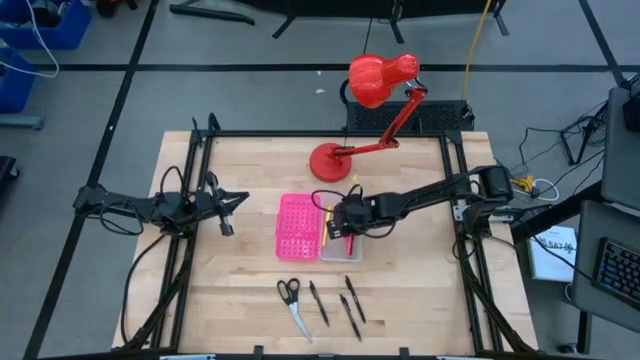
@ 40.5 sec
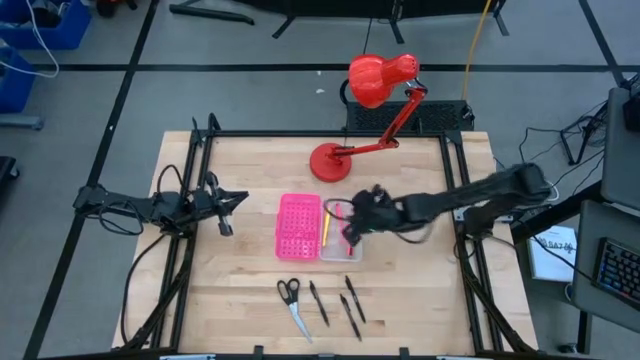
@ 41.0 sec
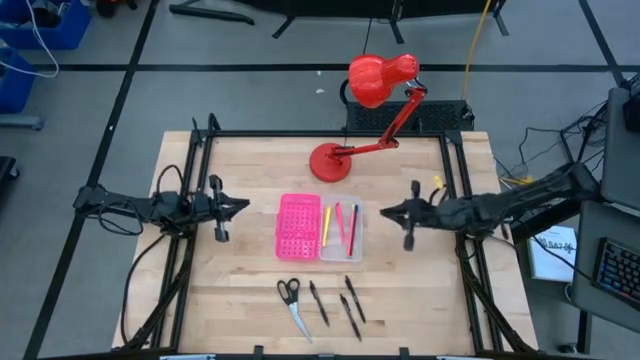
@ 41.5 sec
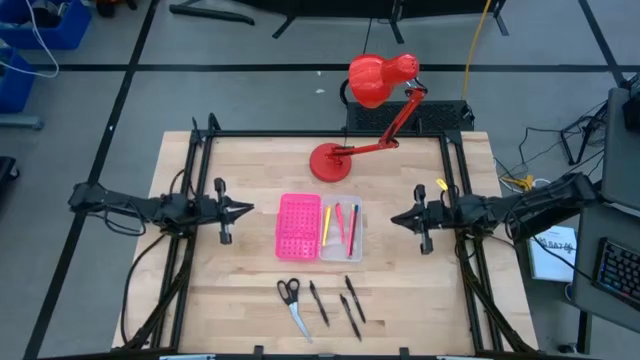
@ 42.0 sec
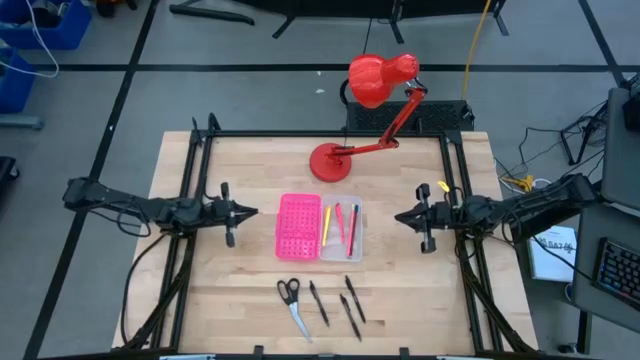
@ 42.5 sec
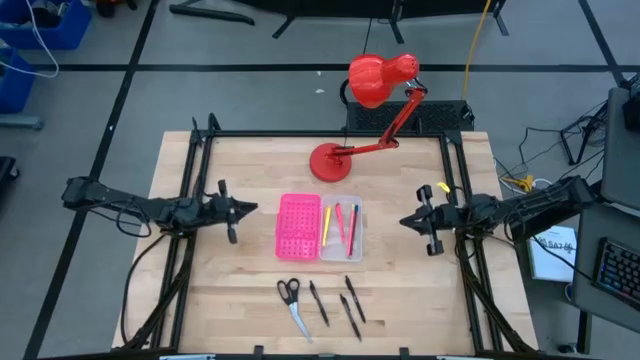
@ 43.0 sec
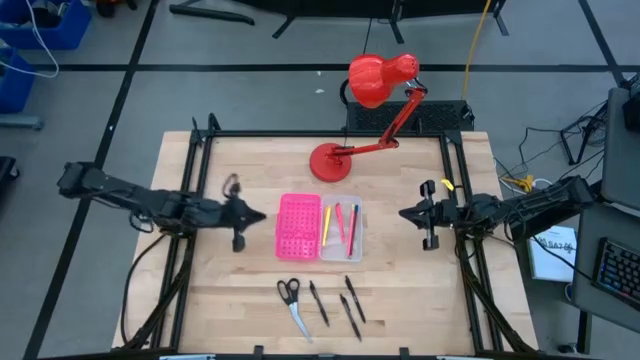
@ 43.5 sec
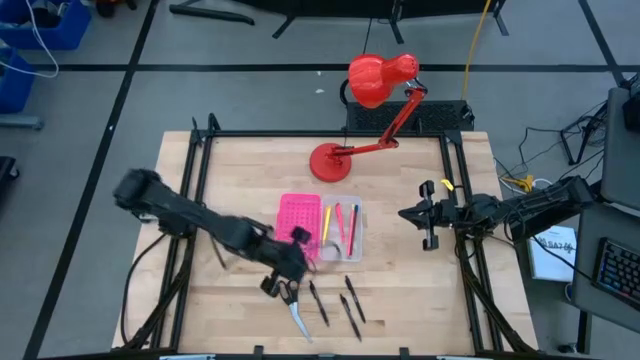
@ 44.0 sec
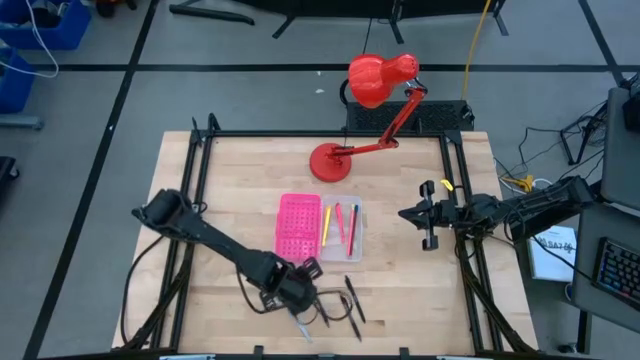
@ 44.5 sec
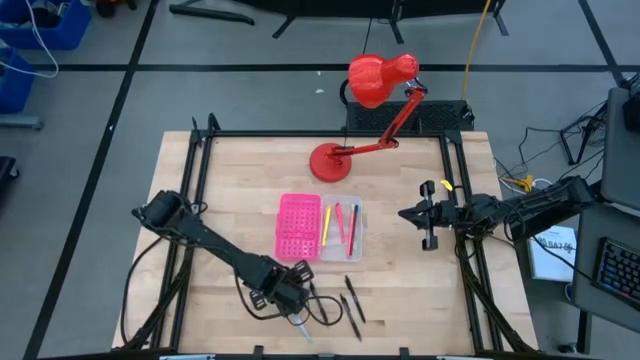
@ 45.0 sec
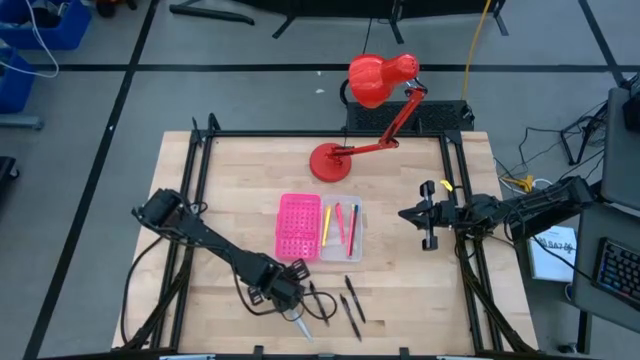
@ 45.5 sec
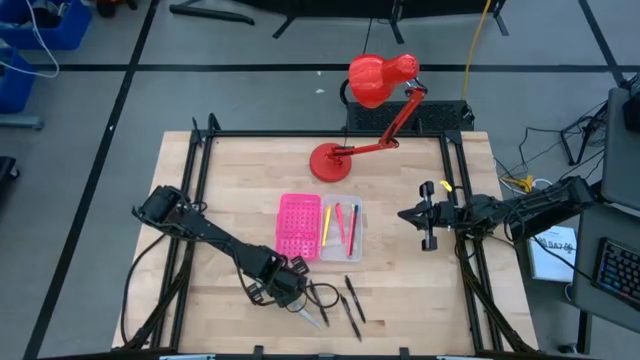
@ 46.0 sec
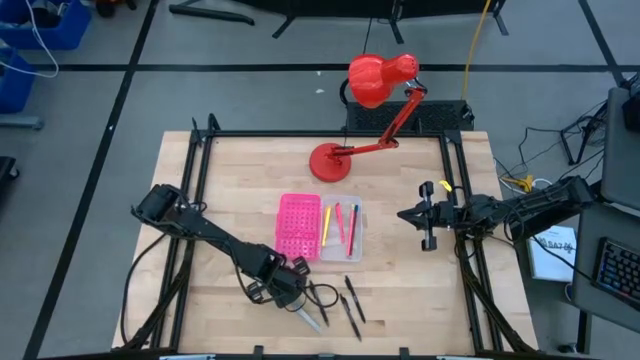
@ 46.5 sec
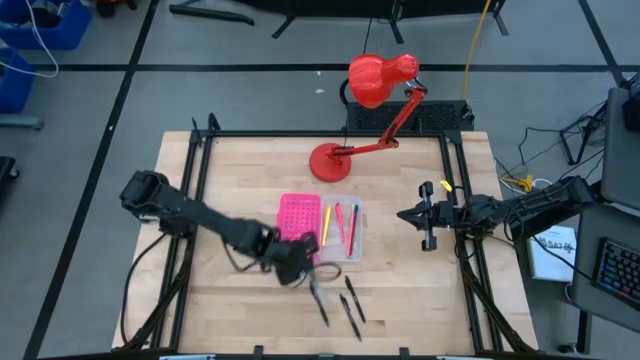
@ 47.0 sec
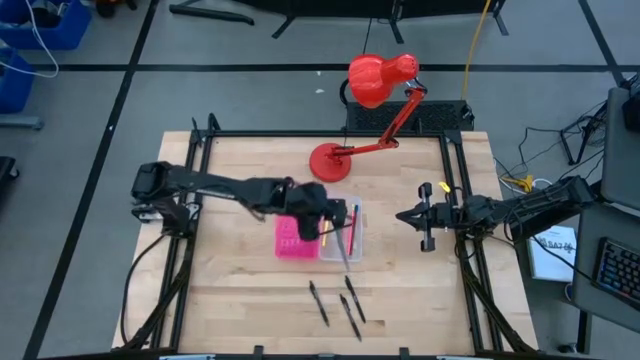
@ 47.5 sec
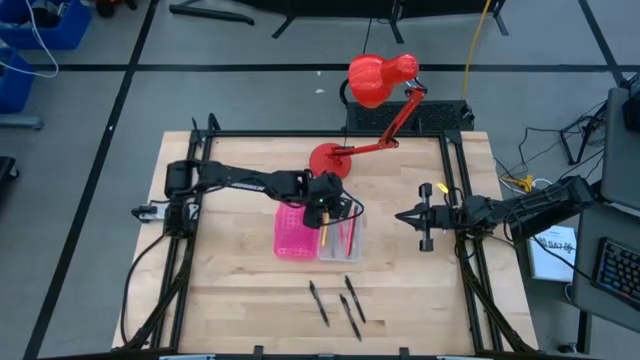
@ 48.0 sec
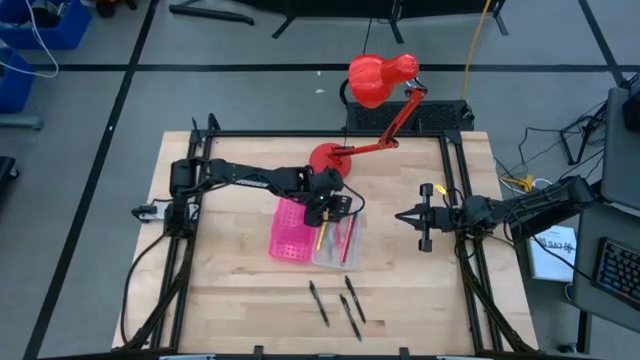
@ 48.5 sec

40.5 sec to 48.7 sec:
Task: Pick & place school supplies into a supply box
Put the black scissors into the pink supply box

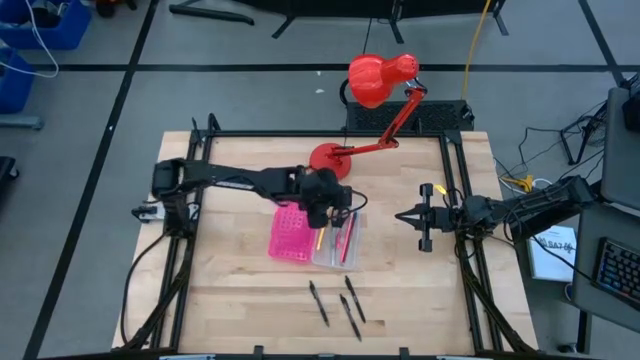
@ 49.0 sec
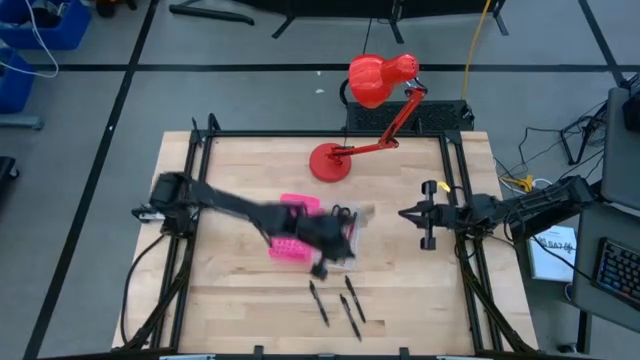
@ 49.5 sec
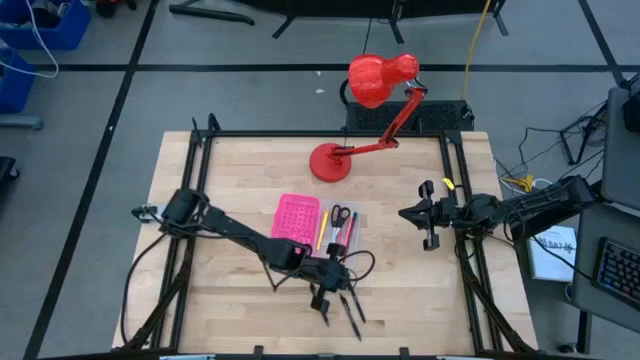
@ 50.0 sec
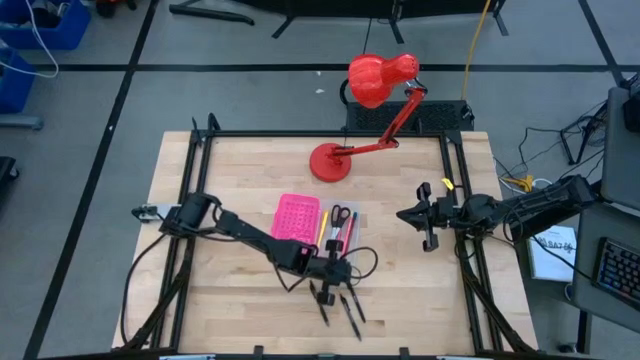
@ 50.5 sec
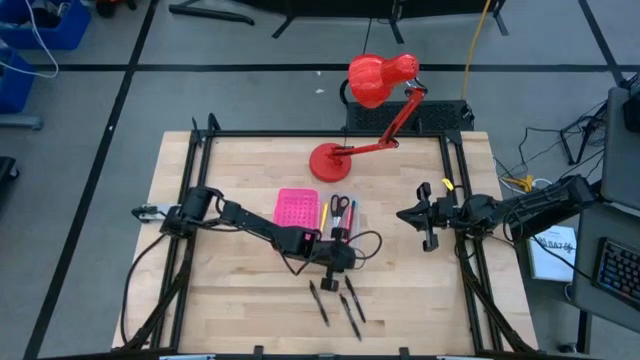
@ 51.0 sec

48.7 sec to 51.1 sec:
Adjust the pink supply box

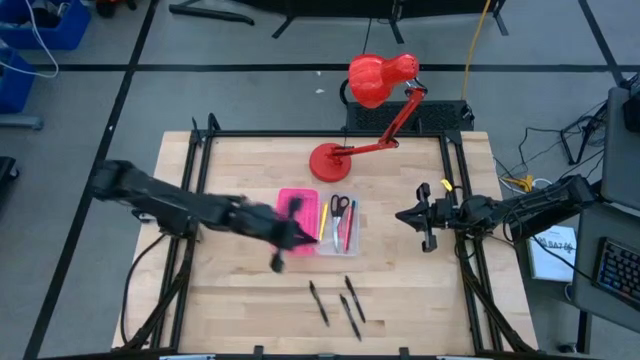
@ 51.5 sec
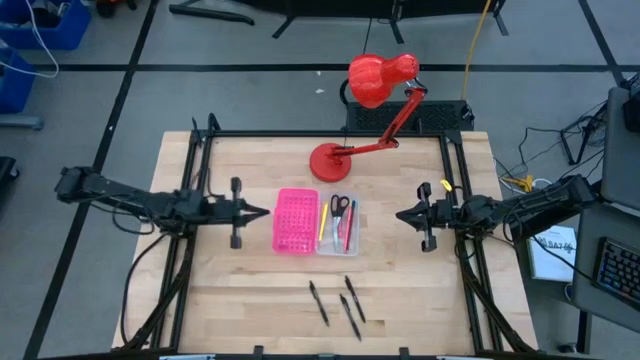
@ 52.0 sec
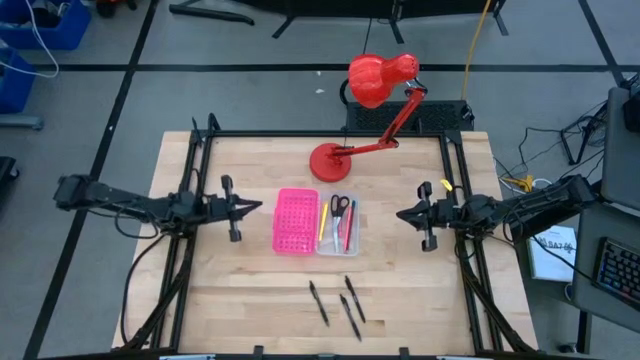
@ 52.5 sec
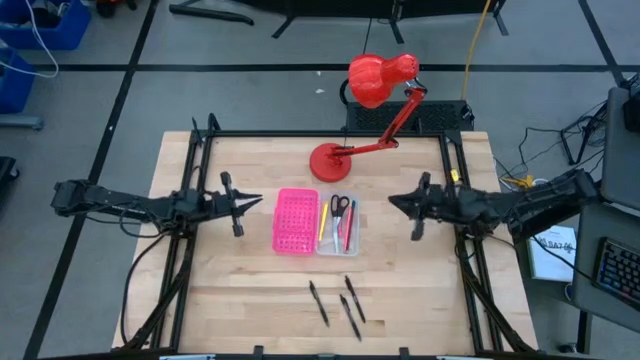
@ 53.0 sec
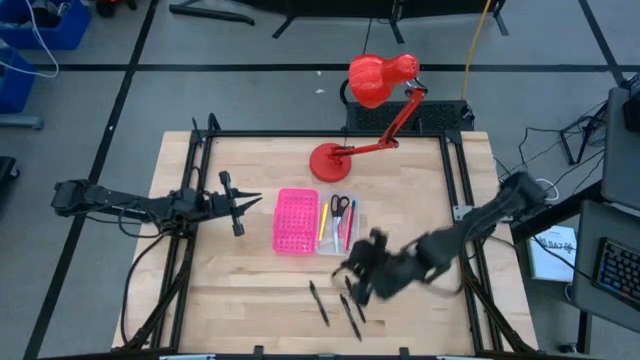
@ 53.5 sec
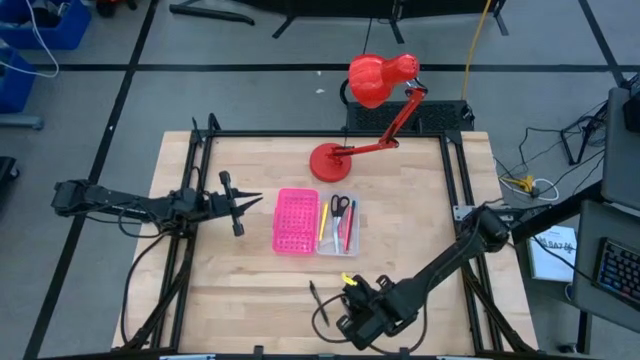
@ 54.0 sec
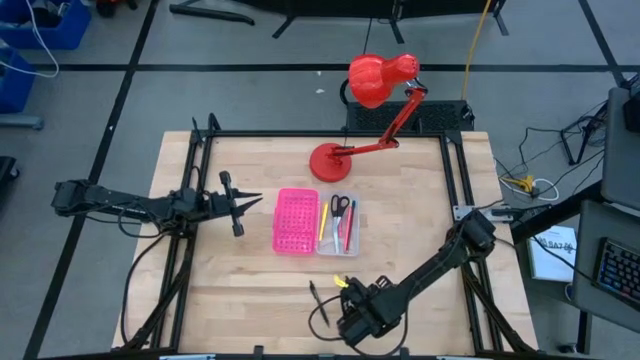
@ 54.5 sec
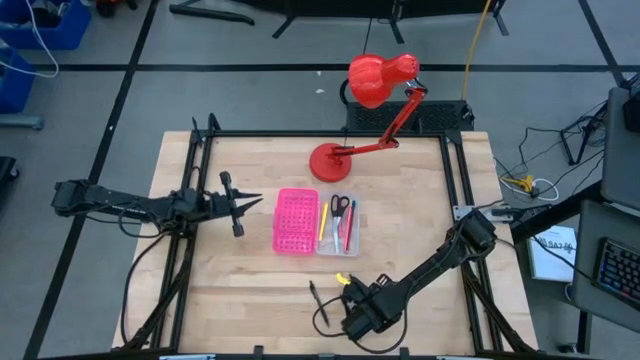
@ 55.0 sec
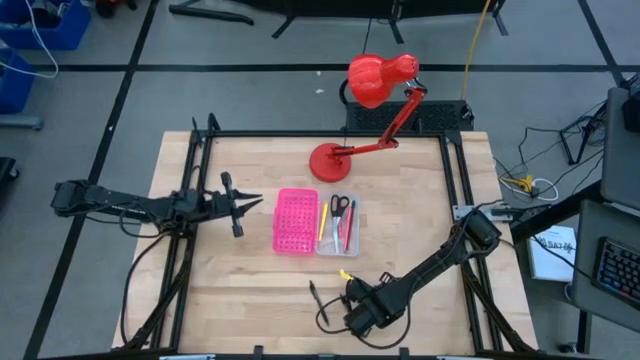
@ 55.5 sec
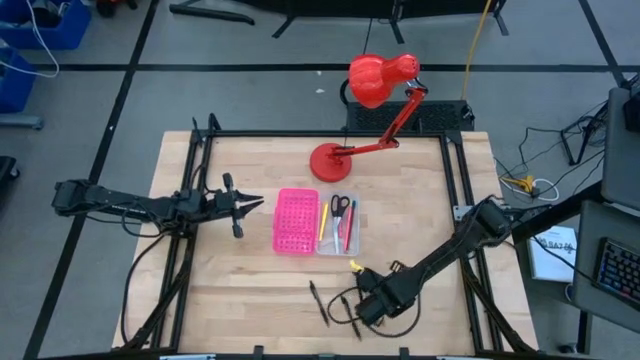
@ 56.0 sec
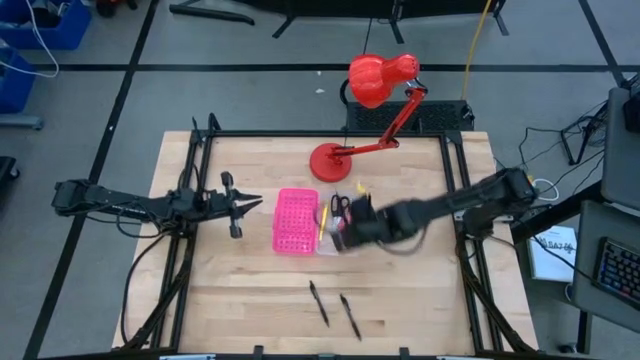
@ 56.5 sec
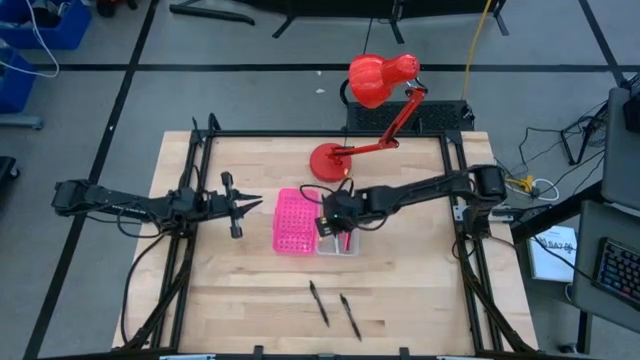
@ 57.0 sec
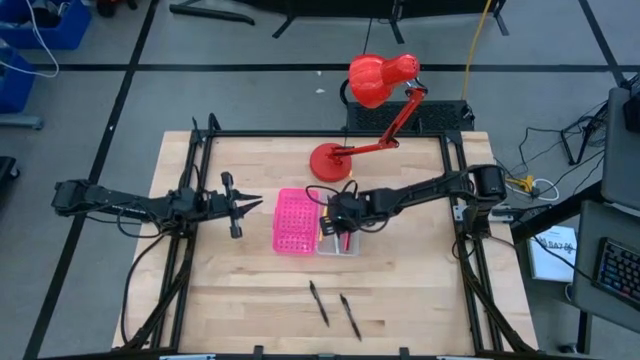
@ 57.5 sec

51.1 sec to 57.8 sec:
Put the right black pen into the pink supply box

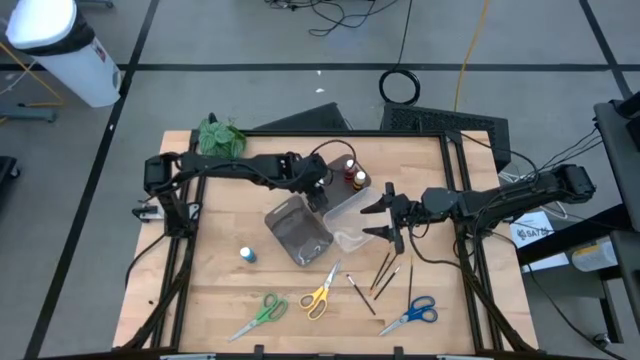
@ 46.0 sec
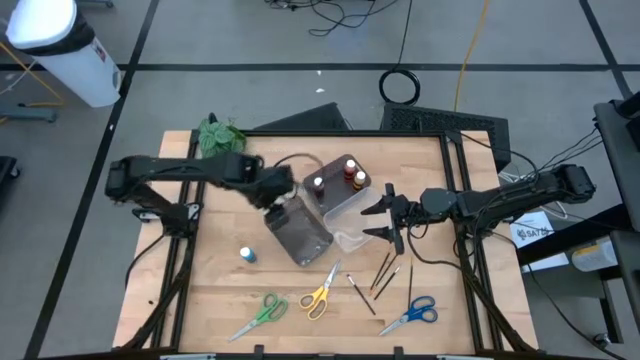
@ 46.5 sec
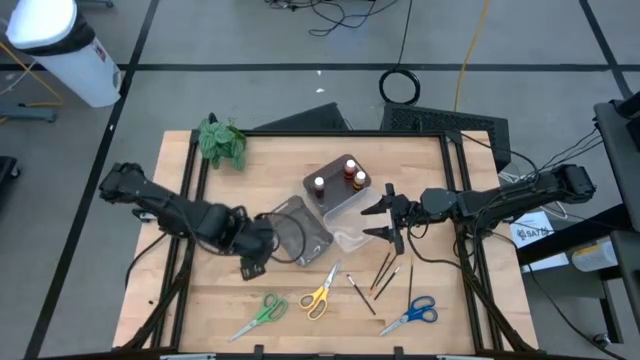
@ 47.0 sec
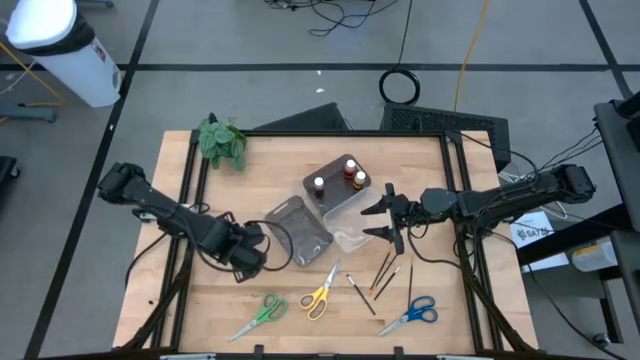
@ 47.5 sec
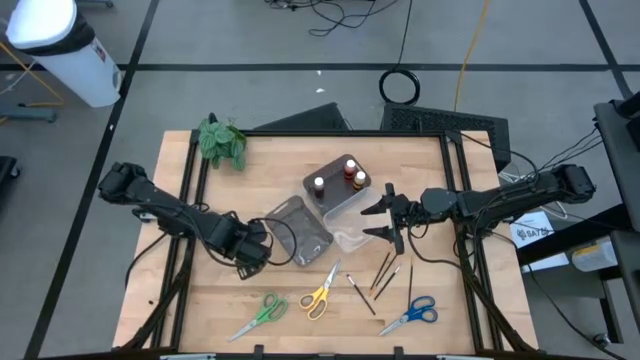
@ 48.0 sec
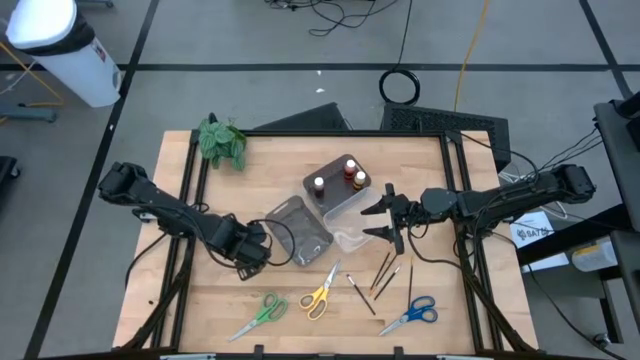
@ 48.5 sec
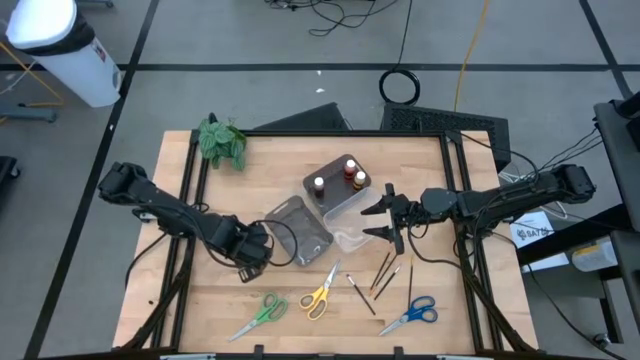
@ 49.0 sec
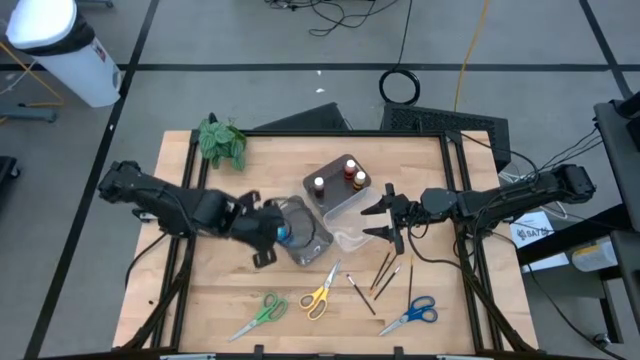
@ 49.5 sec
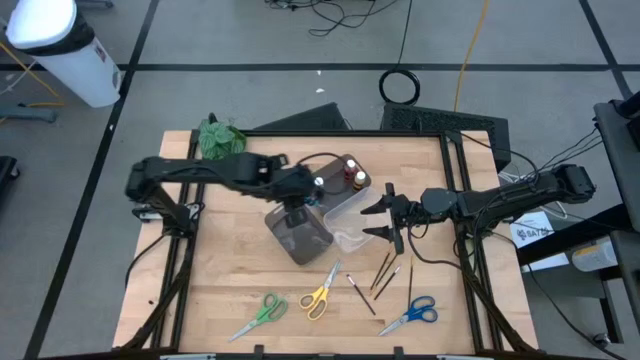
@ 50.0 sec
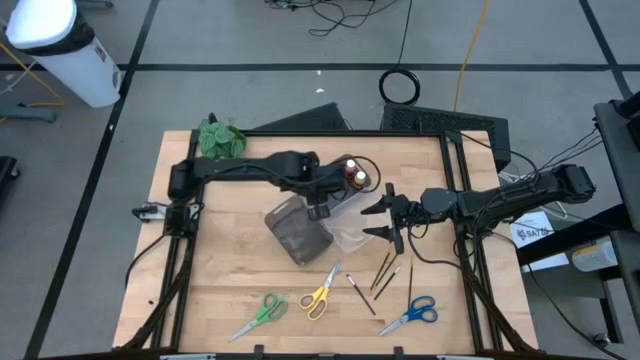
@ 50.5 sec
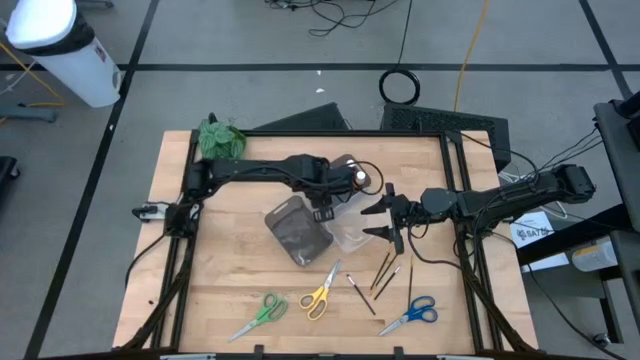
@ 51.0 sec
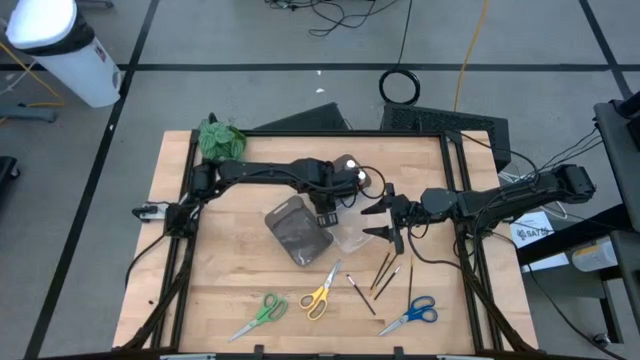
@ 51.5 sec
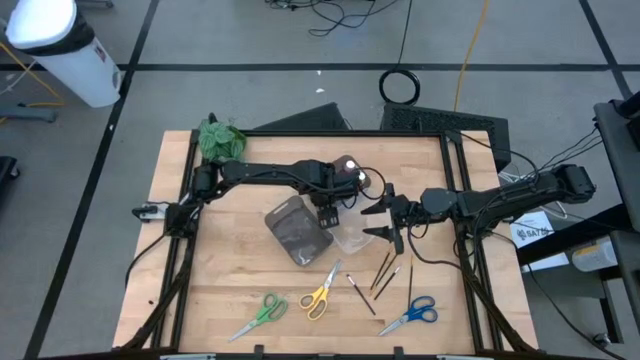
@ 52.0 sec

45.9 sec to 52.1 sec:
Task: Pick & Place Paint Supplies
Put the blue paint bottle into the top black bin
